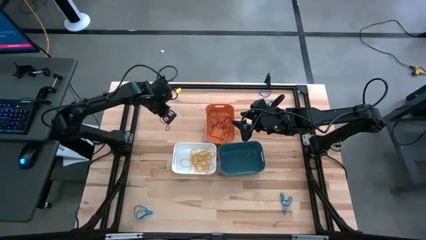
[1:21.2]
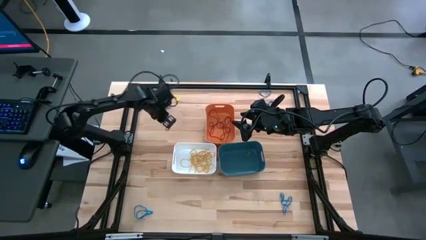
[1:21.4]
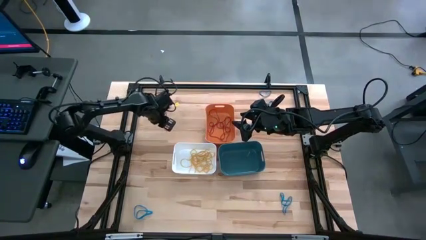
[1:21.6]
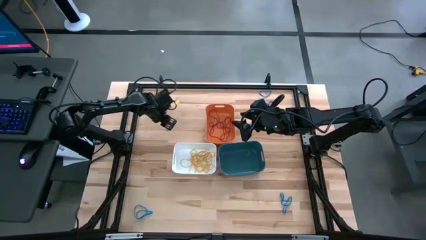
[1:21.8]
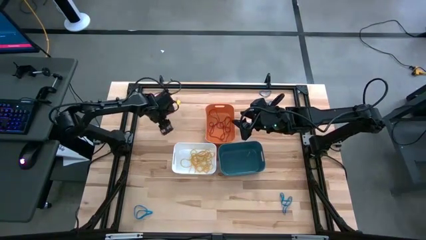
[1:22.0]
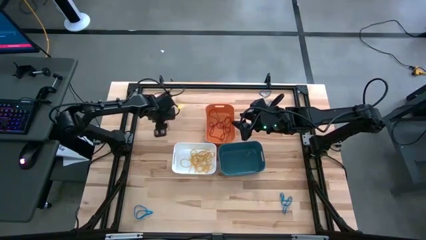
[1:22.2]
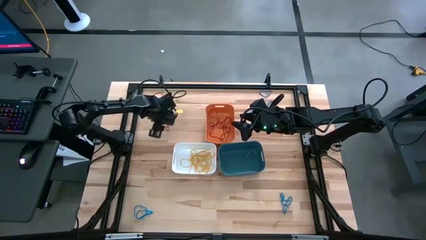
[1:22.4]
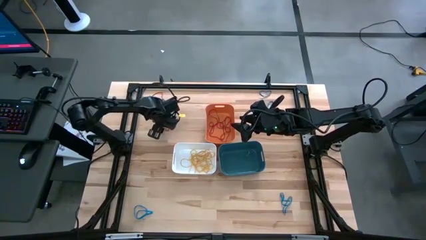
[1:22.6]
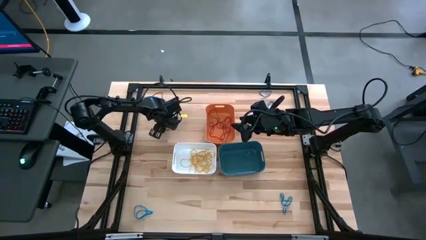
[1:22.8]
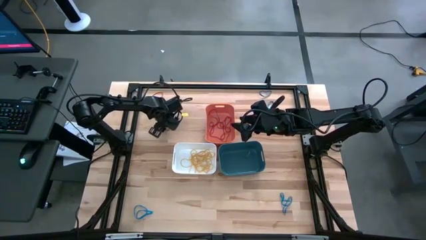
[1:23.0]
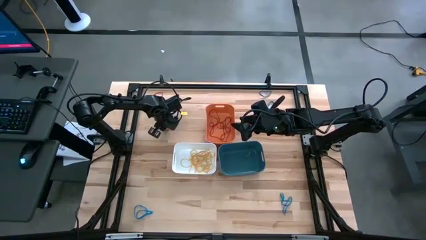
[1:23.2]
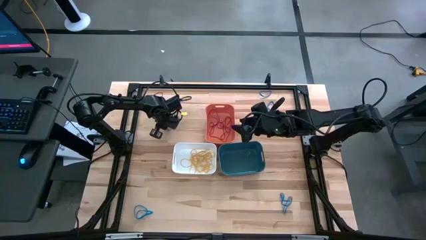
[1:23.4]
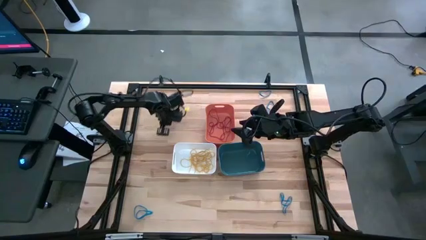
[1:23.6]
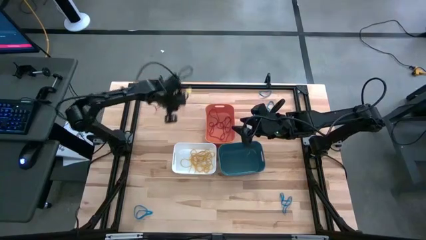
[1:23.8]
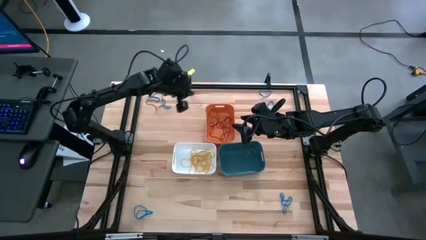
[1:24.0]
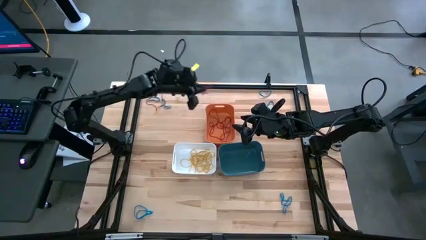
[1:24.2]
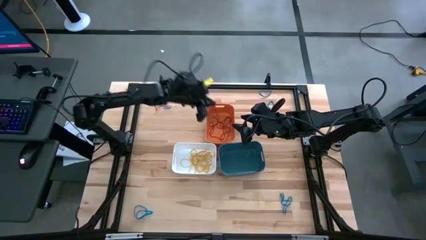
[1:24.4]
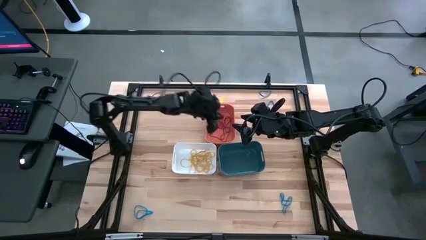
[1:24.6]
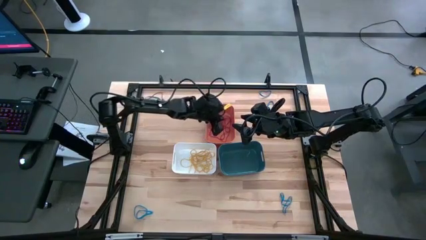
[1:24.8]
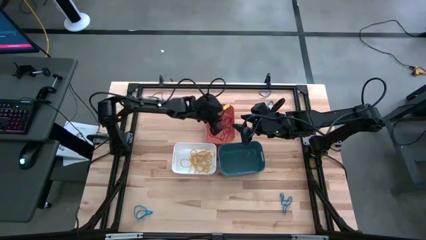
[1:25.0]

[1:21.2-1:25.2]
Task: Sort rubber bands into baskets
Put the red rubber band into the orange bin

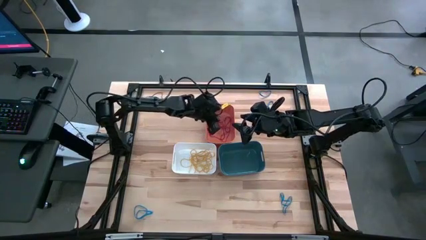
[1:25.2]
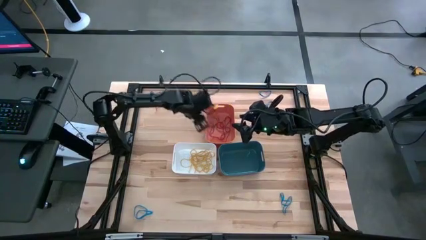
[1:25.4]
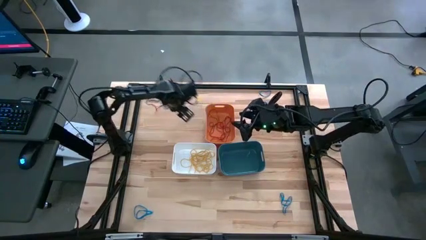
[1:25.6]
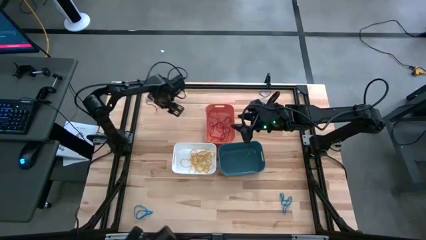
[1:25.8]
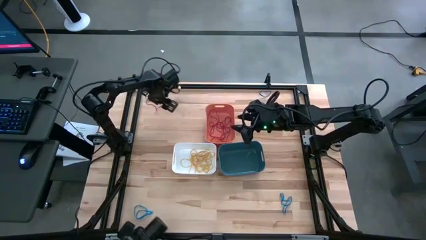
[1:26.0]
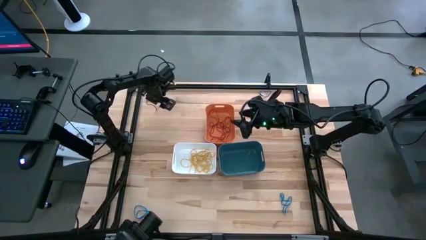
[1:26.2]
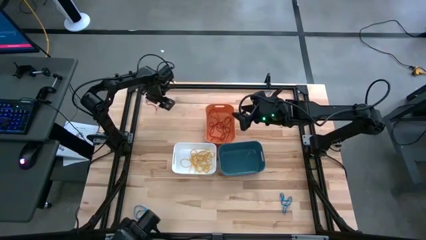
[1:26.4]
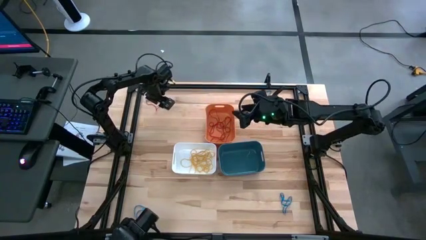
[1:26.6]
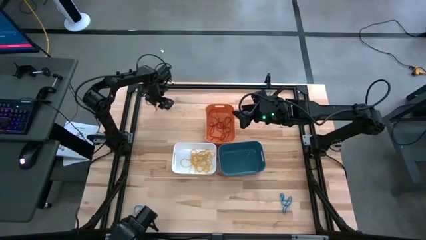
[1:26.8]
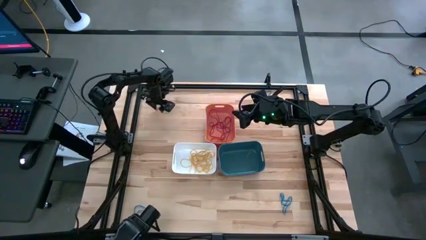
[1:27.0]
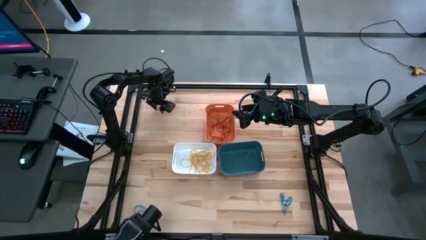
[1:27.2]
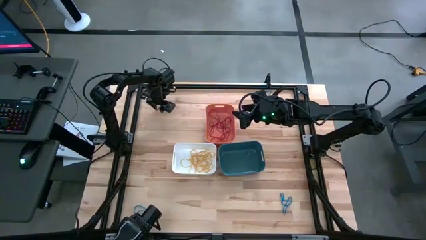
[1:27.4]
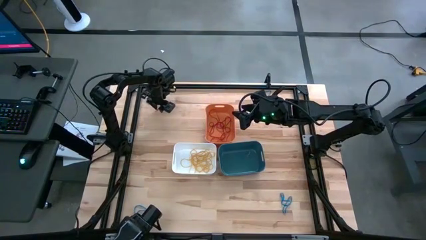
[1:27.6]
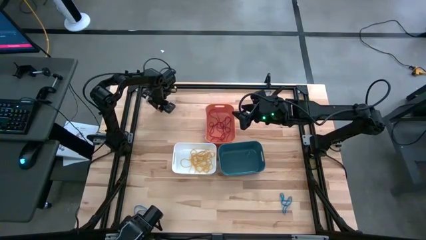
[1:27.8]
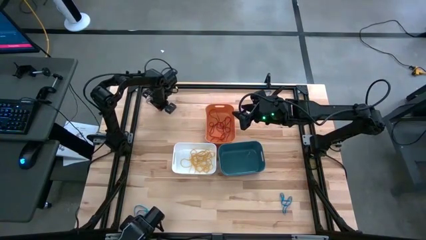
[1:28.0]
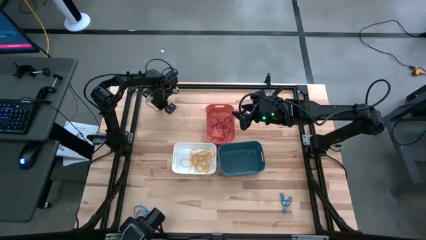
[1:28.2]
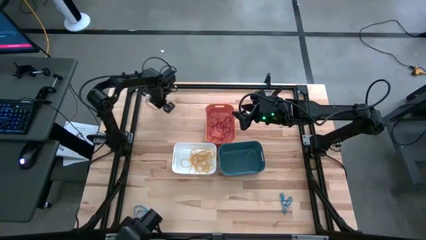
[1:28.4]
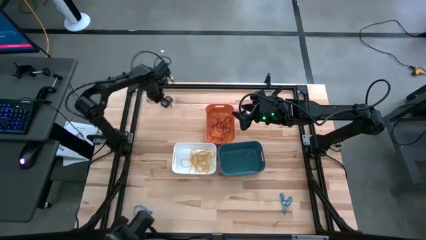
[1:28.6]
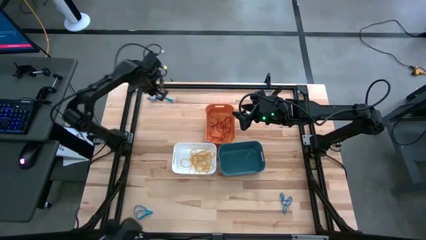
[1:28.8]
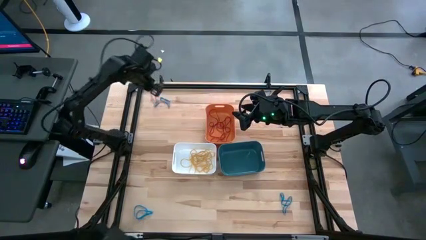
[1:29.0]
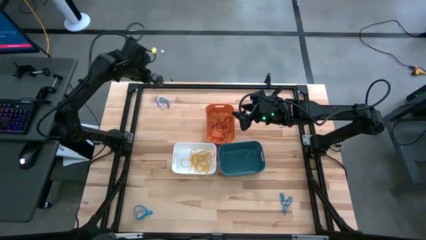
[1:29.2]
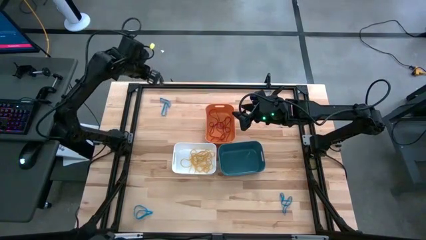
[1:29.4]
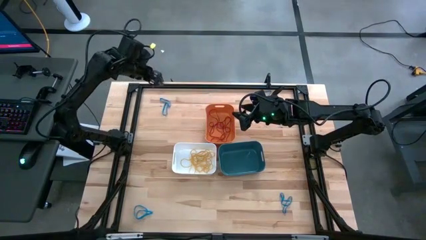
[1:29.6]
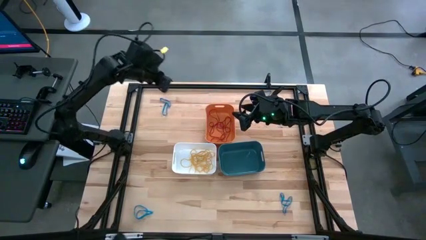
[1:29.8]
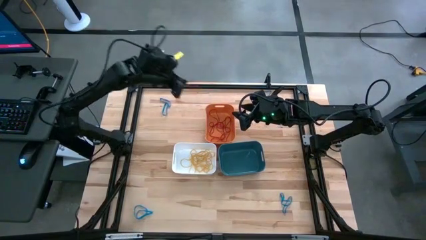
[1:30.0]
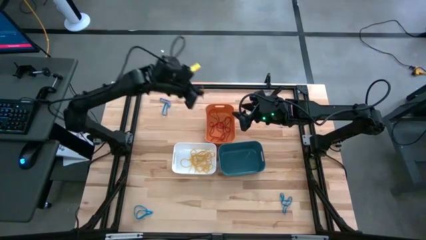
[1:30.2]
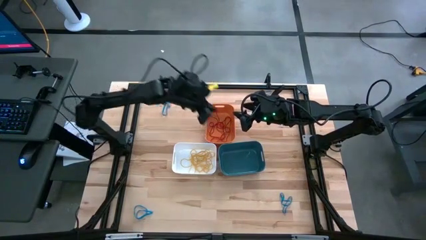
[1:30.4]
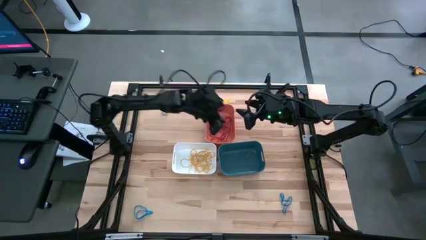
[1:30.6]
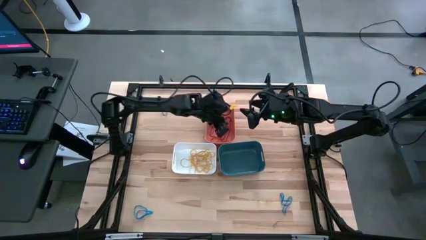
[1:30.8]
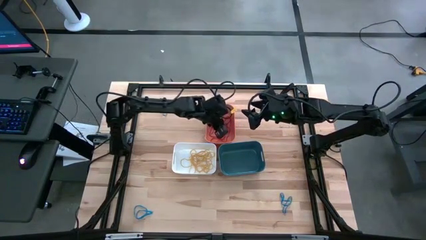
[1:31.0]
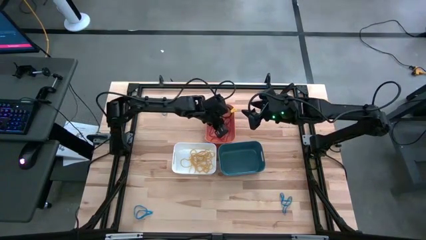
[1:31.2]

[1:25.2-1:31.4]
Put the red rubber band into the orange bin

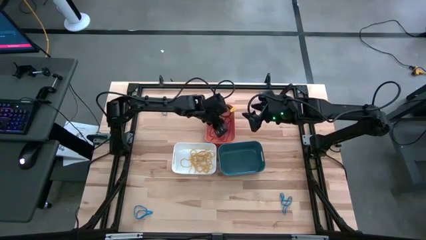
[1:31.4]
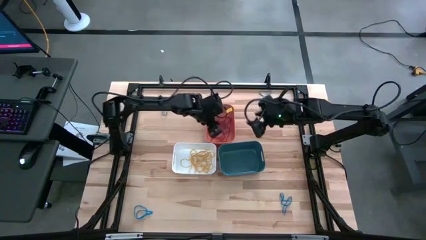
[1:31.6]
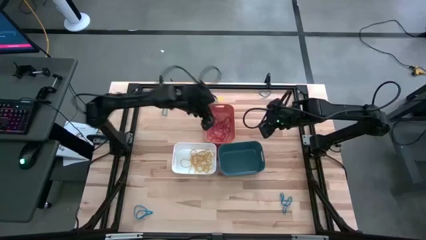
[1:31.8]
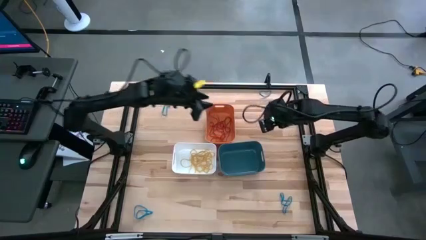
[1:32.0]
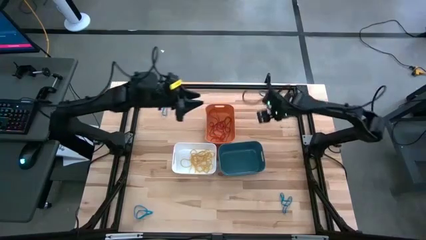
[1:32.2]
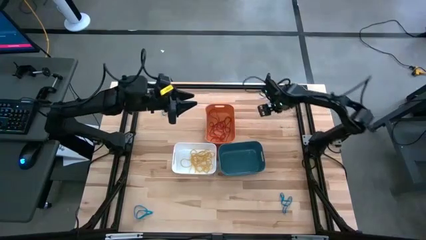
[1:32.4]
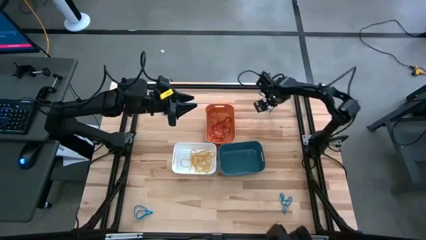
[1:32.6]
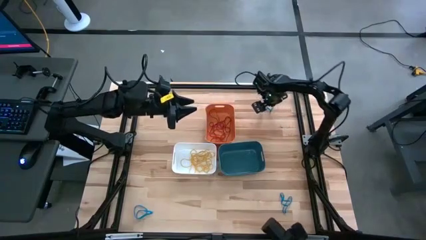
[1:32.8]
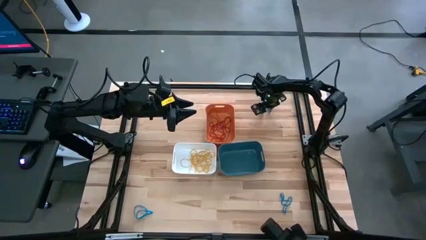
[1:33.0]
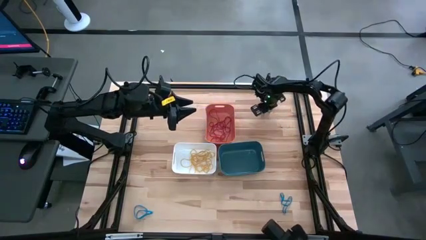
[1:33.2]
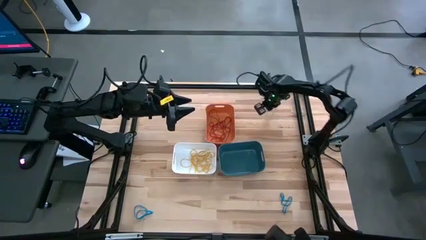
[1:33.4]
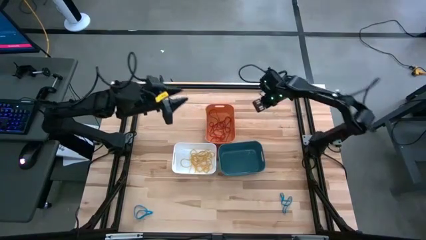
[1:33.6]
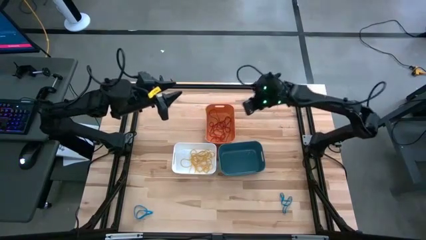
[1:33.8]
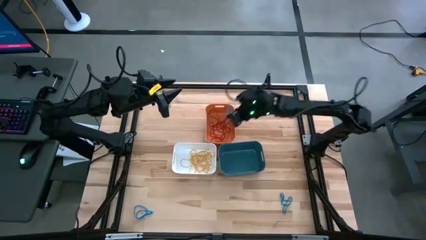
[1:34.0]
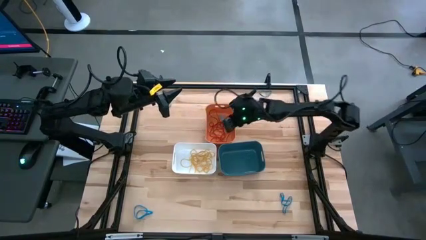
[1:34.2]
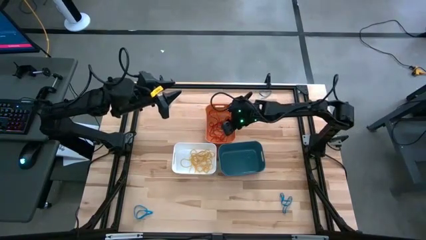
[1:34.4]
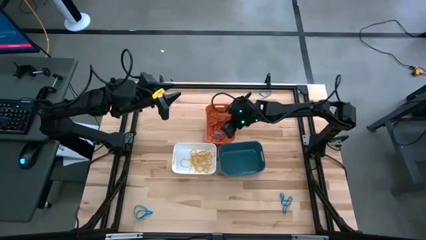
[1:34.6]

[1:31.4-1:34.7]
Put the blue rubber band into the blue bin

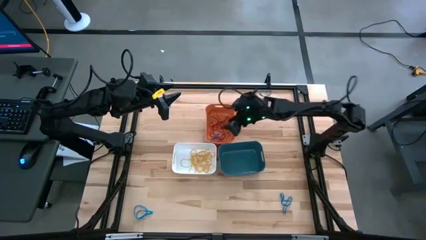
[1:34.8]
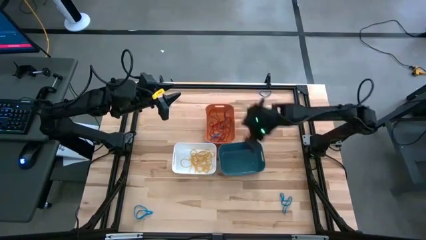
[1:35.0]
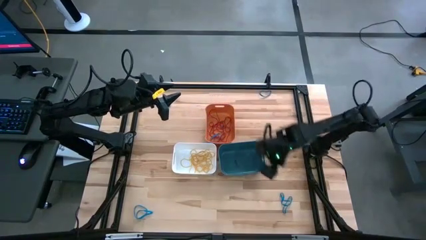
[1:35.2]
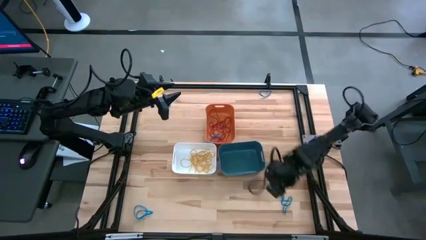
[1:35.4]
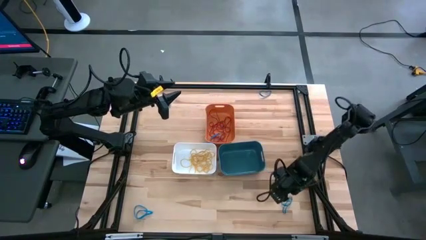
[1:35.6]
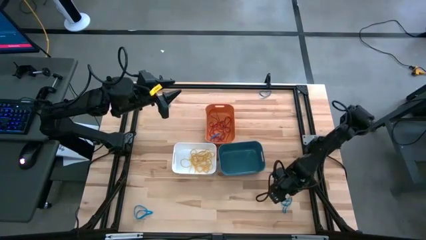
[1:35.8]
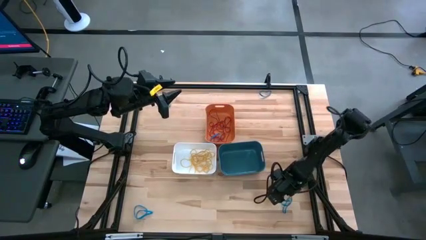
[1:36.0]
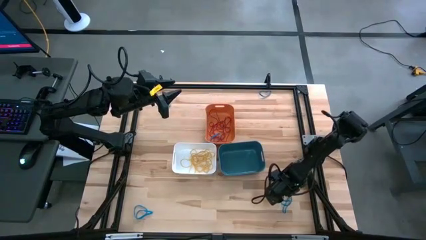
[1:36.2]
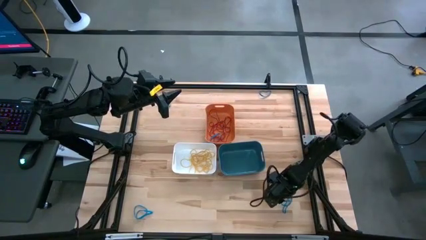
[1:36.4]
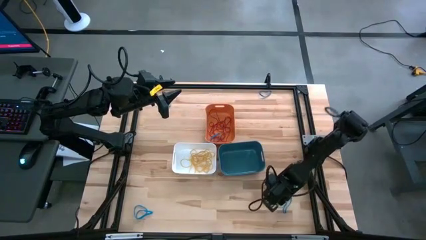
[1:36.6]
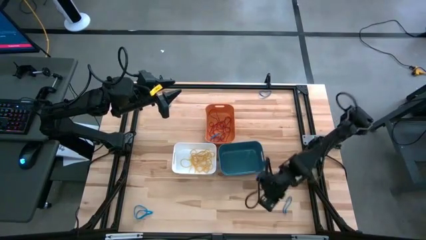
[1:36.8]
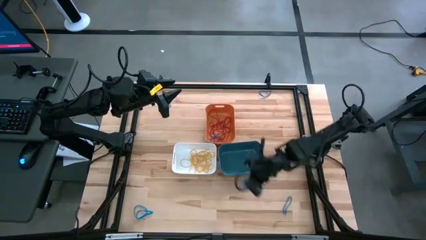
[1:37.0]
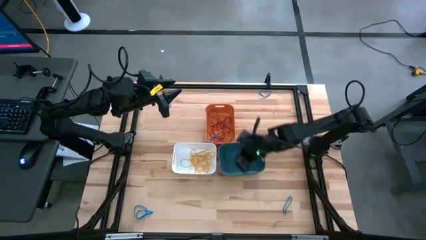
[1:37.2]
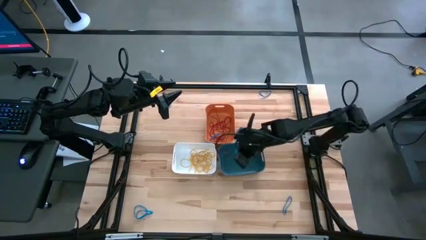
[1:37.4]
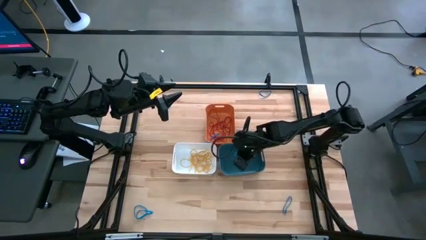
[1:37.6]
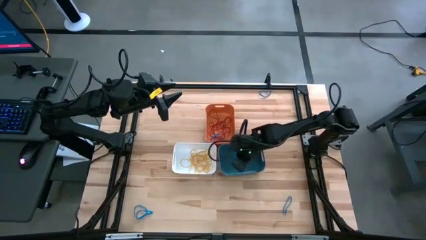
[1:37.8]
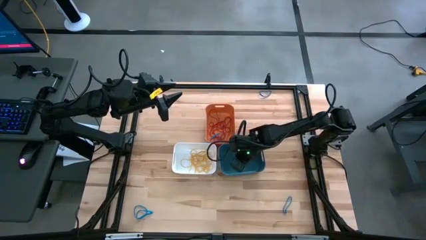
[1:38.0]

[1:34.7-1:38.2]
Put the blue rubber band into the blue bin
